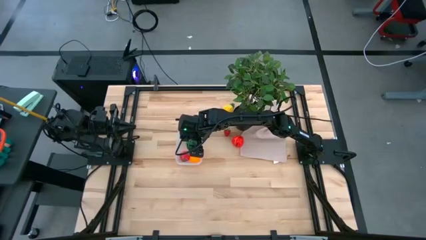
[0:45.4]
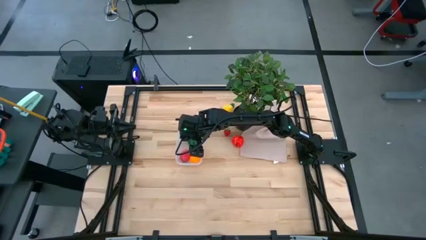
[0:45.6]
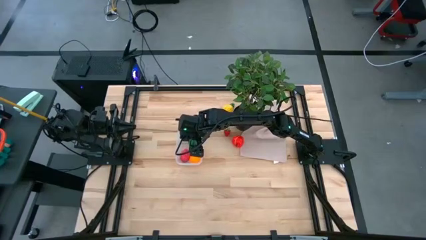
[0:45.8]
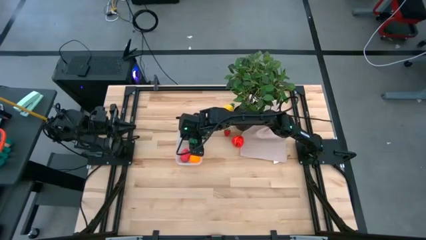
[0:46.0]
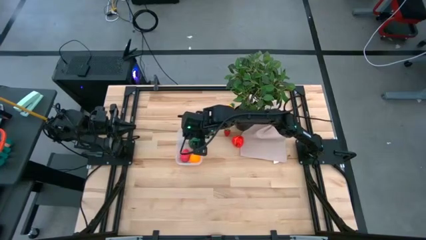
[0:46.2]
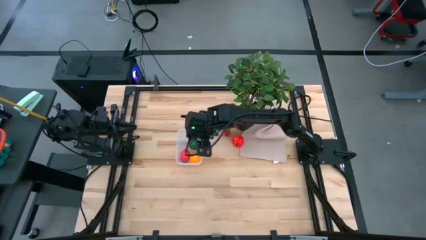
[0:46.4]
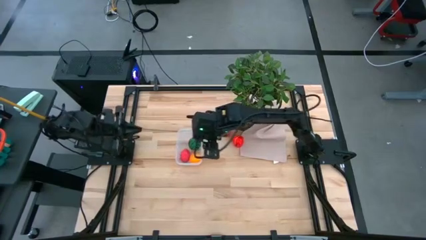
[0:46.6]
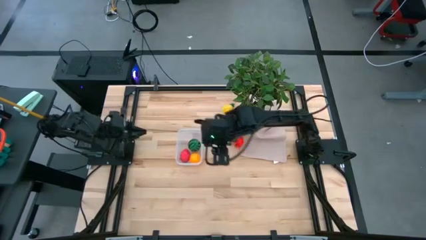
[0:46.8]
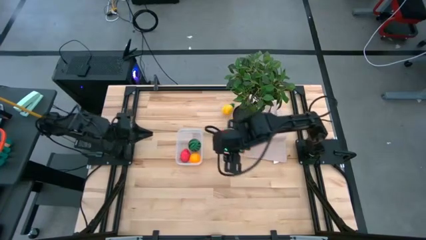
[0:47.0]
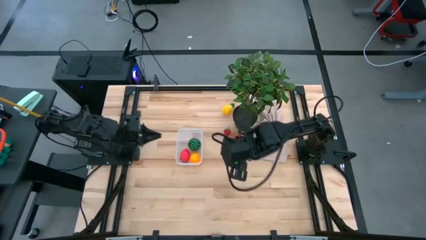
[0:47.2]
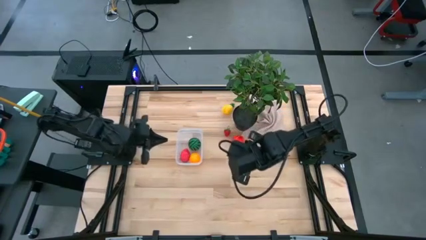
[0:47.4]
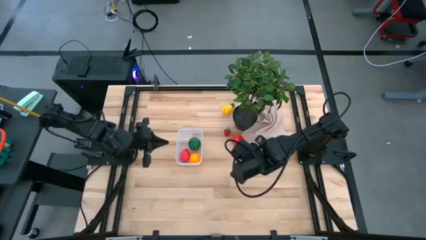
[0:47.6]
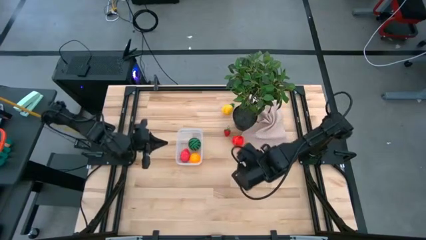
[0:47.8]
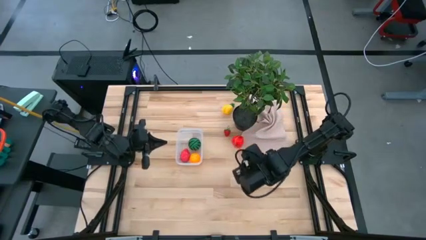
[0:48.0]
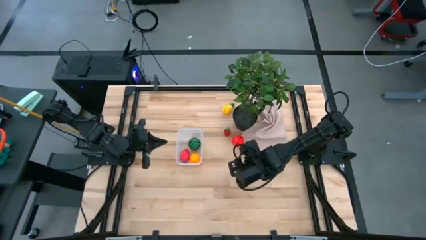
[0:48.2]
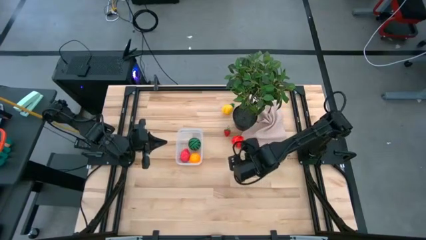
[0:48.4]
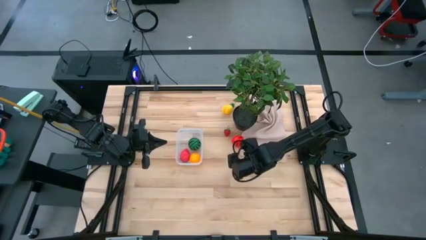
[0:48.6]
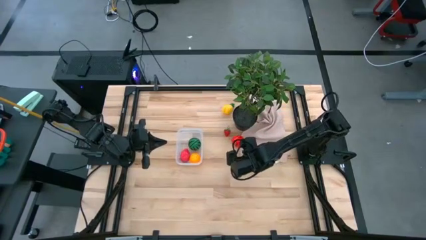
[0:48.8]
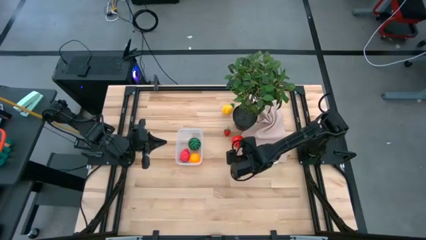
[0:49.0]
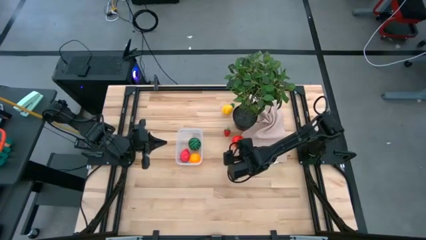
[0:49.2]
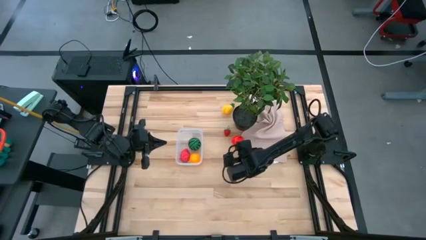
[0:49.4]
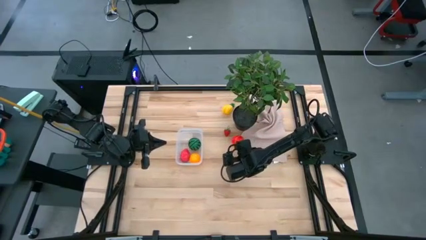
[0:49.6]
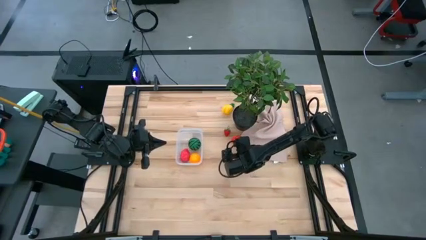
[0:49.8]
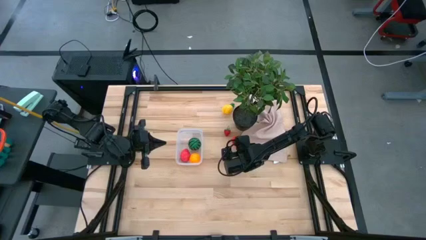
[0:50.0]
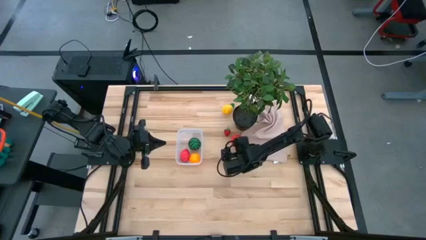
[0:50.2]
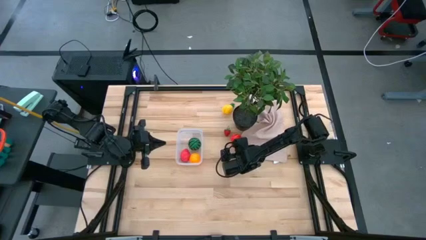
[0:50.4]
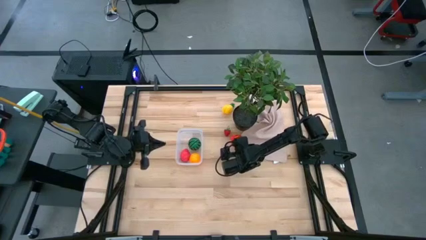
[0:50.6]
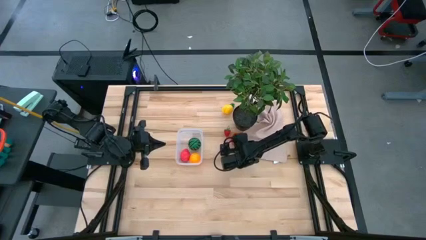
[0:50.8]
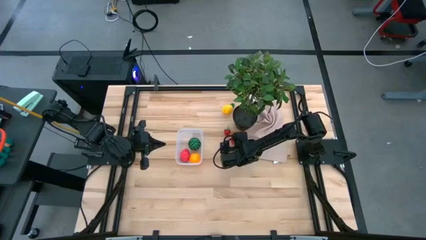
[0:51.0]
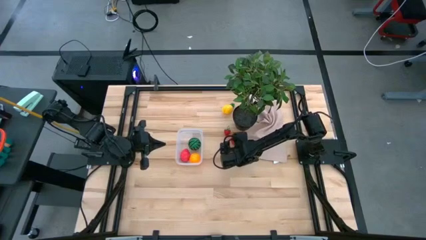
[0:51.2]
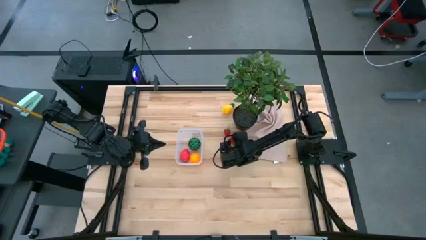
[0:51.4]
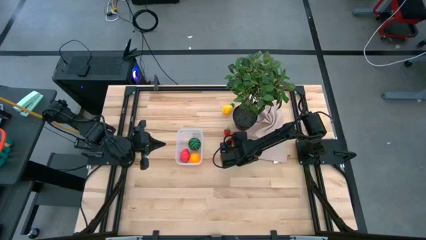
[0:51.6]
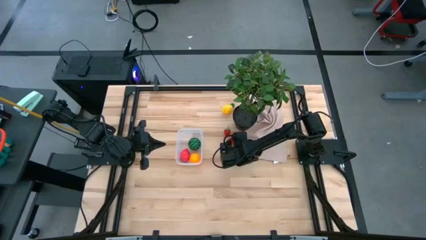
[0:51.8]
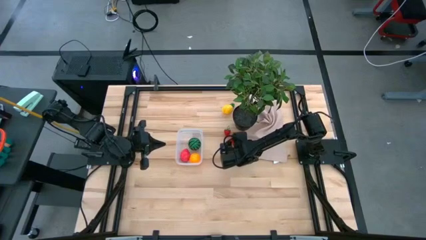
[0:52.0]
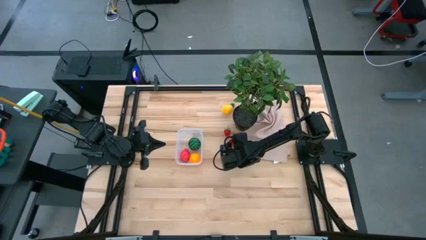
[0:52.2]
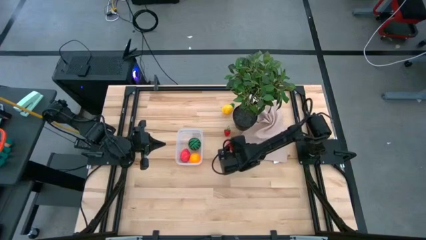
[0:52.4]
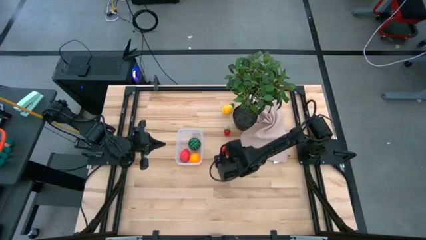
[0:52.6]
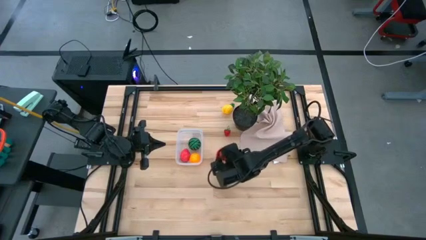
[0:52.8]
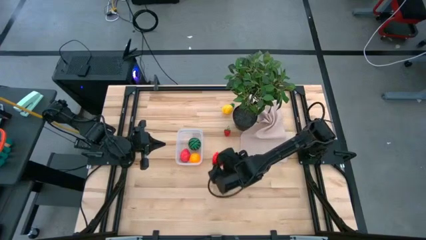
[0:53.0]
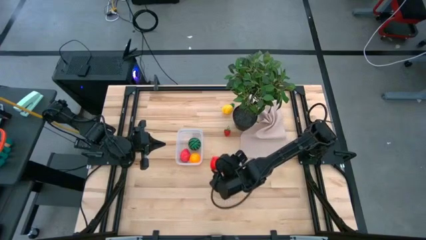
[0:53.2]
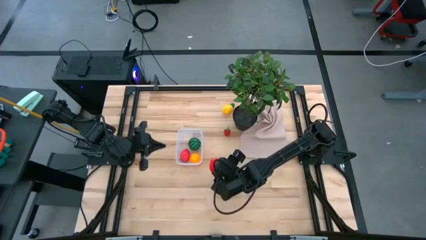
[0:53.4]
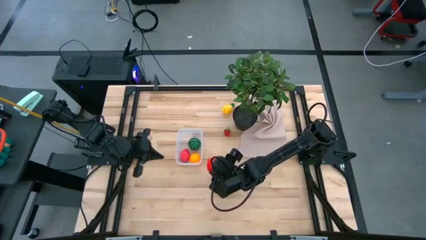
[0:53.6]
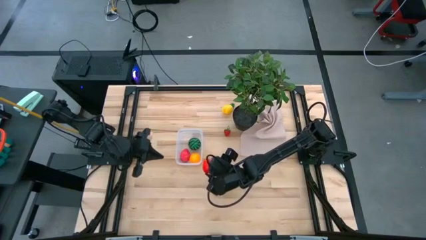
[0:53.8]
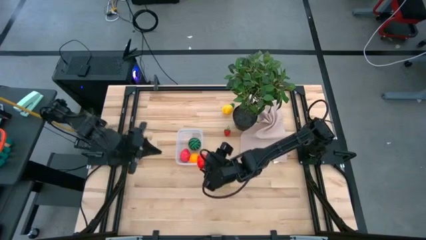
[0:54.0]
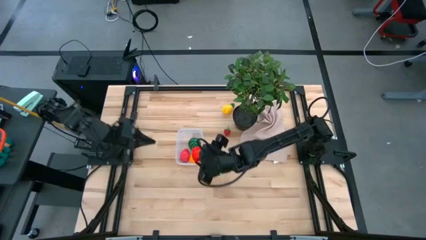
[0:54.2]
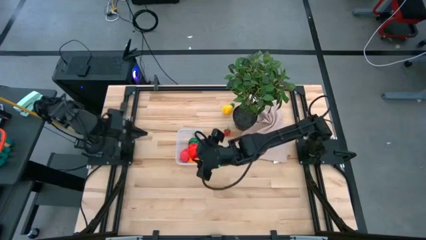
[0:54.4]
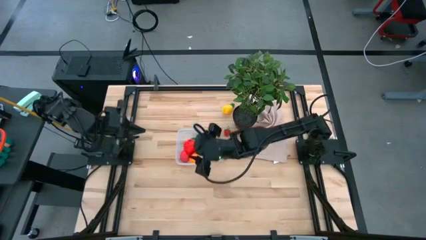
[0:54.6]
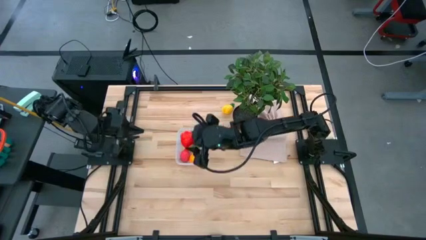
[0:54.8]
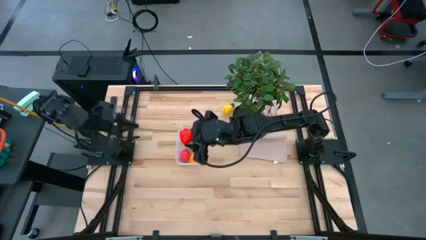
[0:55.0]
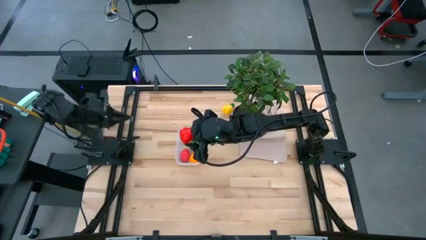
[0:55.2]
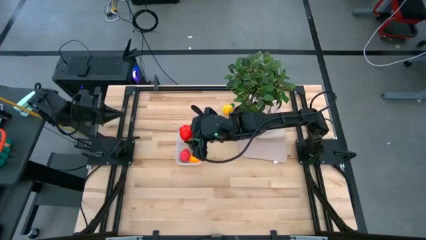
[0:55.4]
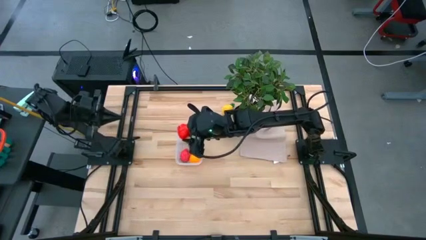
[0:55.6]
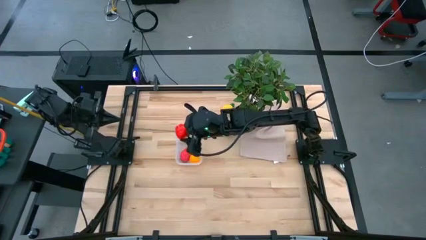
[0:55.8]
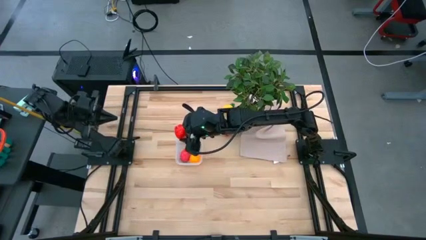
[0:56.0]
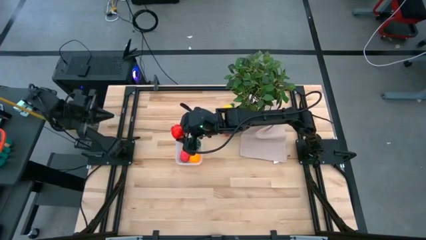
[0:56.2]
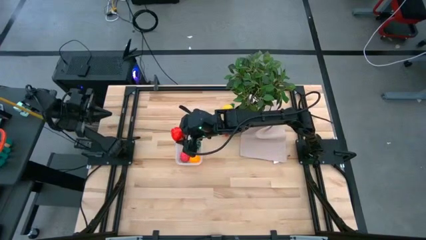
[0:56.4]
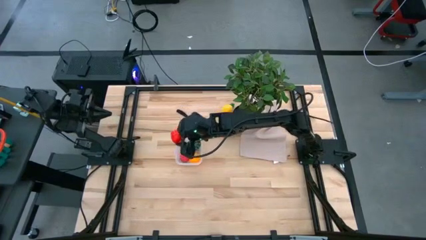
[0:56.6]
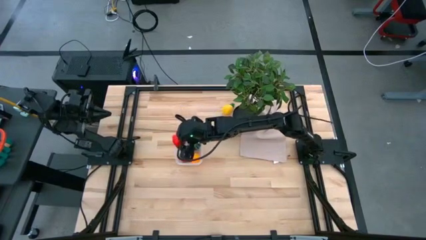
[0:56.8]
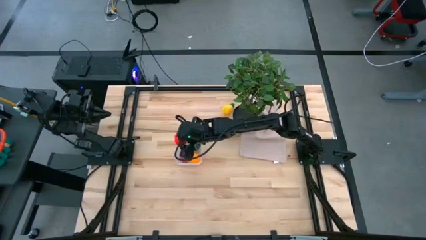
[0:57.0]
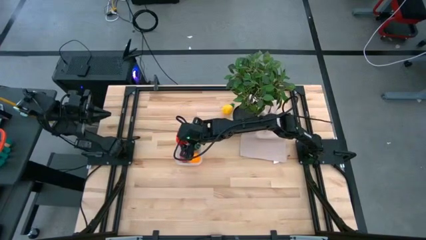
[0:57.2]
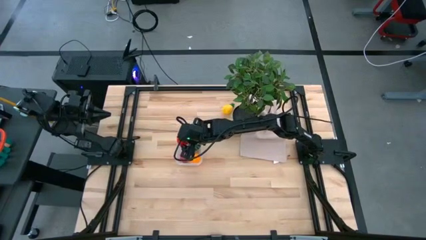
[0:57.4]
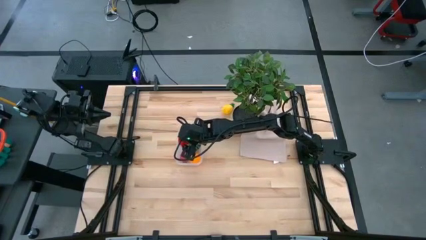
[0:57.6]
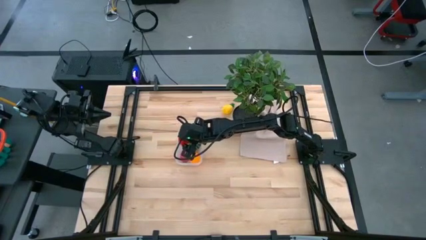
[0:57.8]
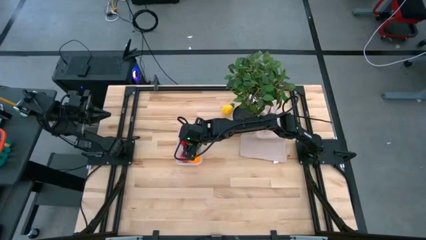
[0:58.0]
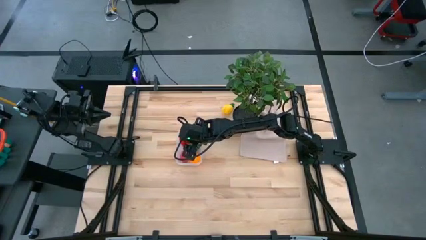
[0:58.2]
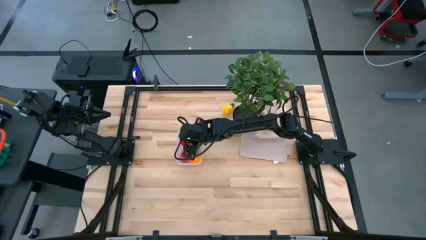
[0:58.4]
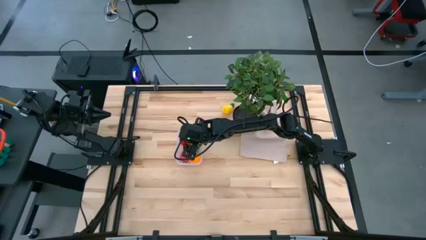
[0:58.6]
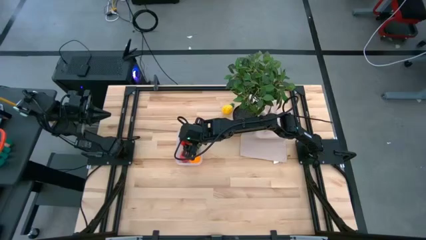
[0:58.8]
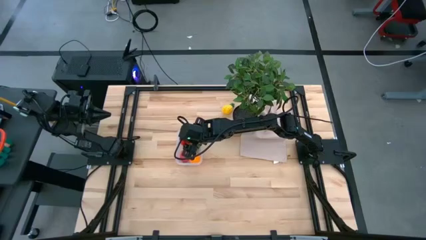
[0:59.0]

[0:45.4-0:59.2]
Task: Pick and placing Produce into tupperware
Put the red apple into the transparent bin

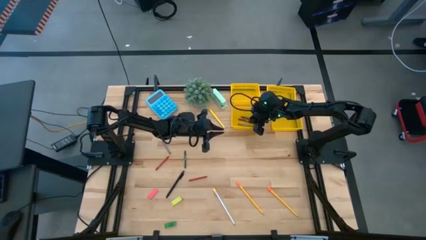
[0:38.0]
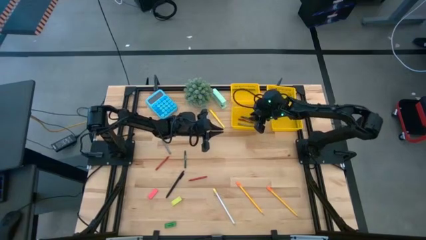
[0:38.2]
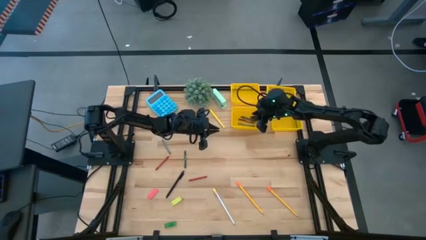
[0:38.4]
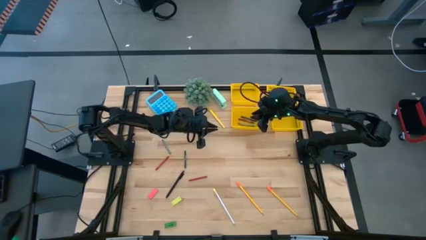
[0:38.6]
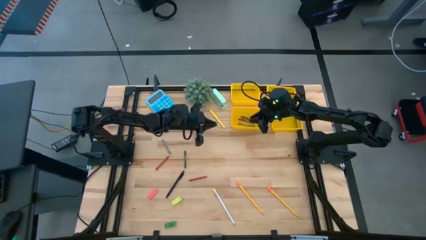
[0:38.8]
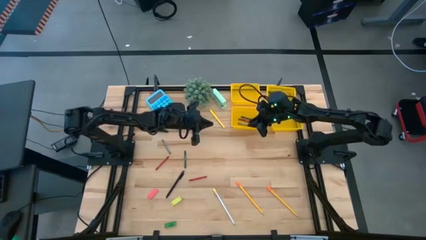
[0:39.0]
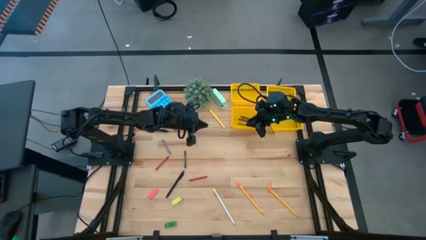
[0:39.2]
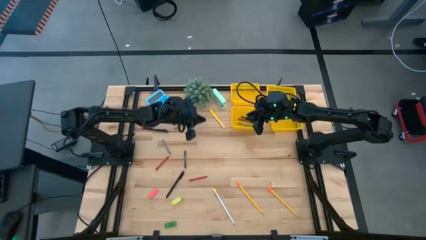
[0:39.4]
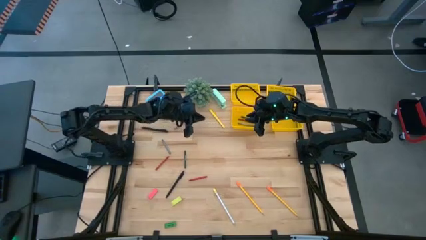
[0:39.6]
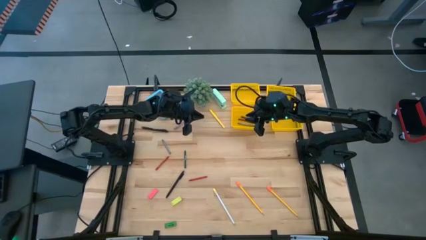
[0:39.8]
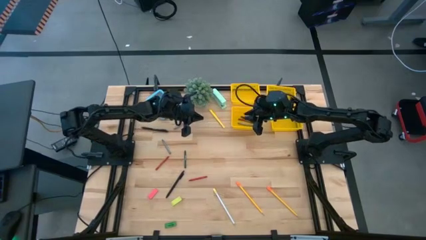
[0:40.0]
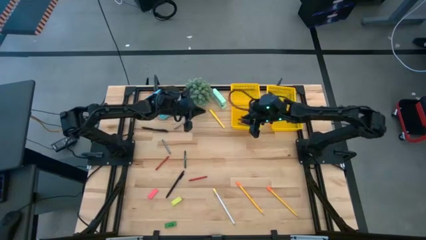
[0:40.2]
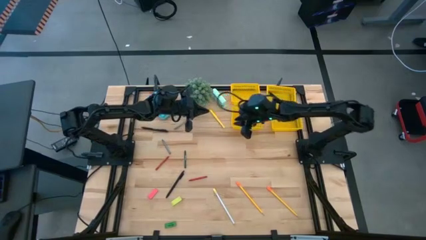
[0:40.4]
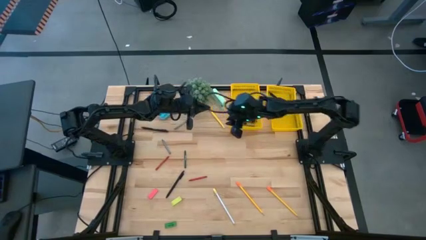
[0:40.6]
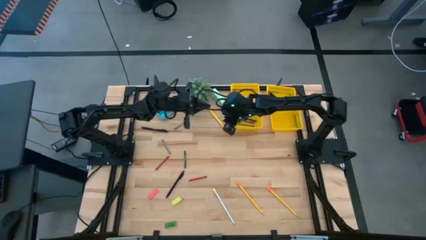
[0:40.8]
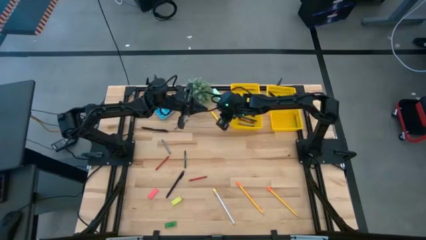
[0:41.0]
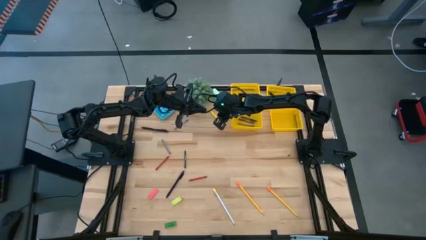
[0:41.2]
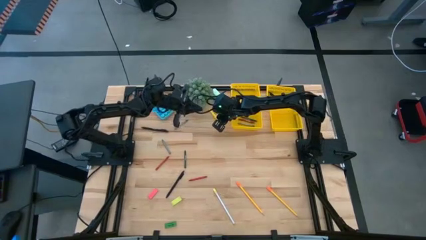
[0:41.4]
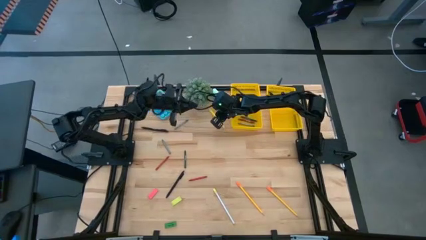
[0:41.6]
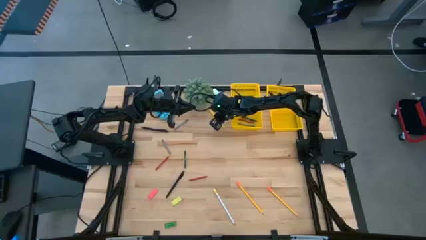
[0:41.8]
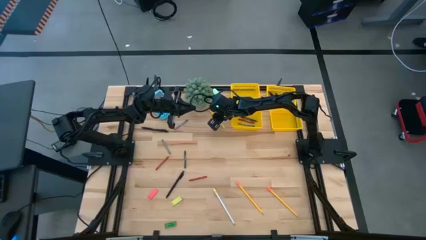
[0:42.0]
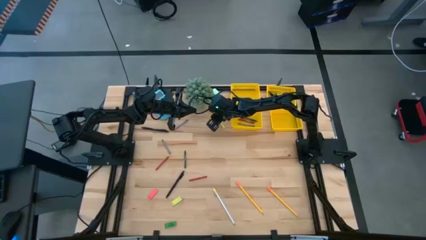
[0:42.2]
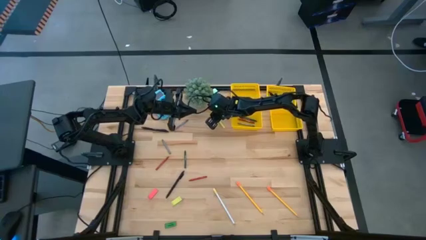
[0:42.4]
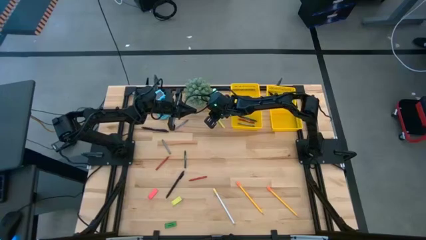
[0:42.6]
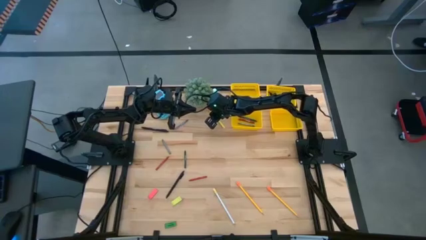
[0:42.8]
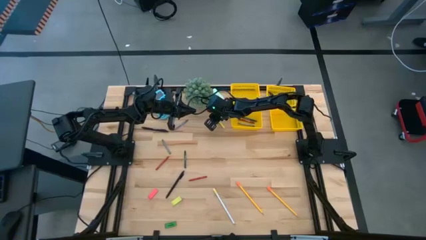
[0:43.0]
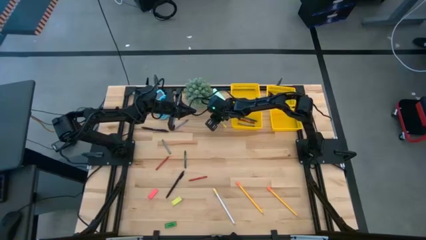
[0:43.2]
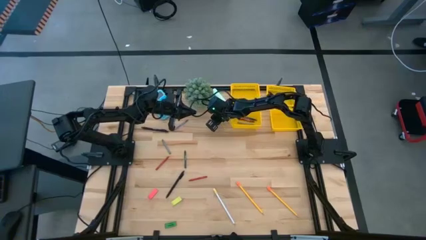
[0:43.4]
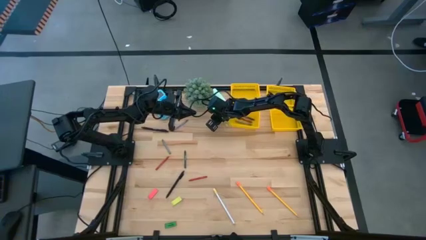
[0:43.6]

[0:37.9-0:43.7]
Task: Sort crayons/erasers/pens/pencils in bins
Put the yellow pen into the top right yellow bin
